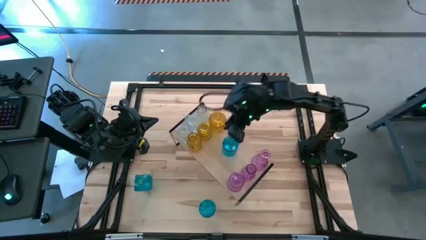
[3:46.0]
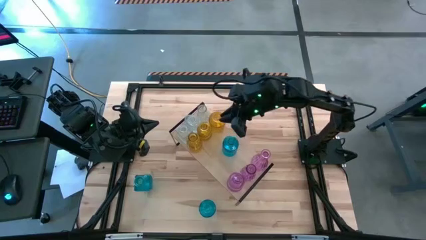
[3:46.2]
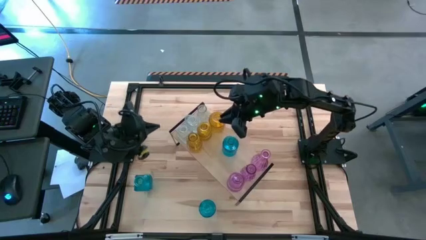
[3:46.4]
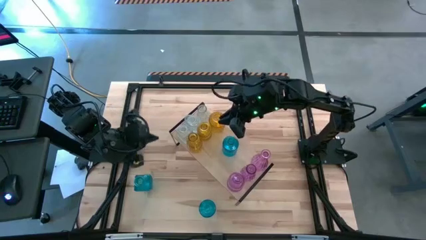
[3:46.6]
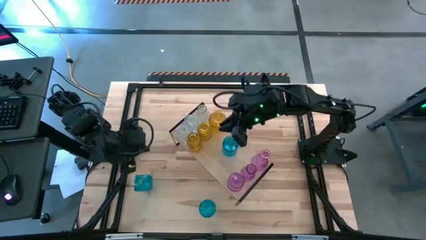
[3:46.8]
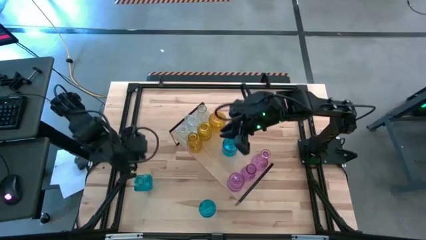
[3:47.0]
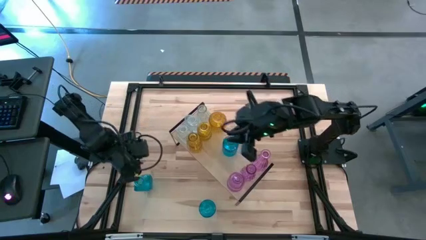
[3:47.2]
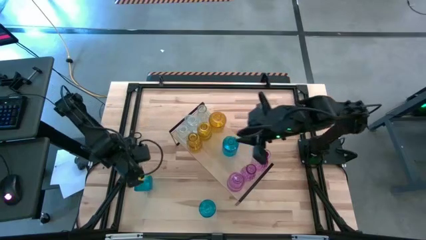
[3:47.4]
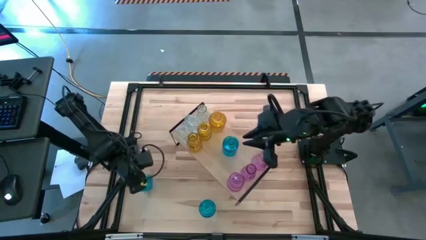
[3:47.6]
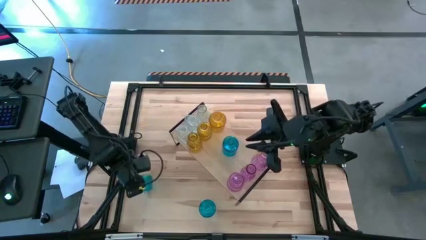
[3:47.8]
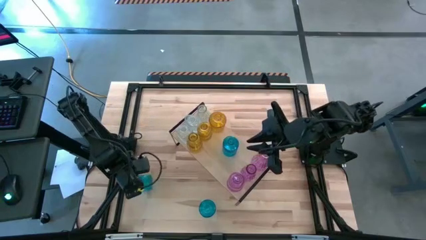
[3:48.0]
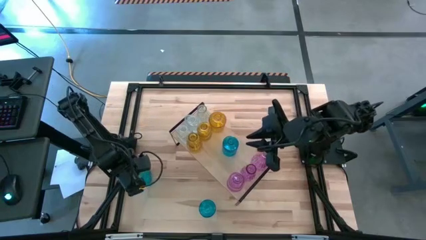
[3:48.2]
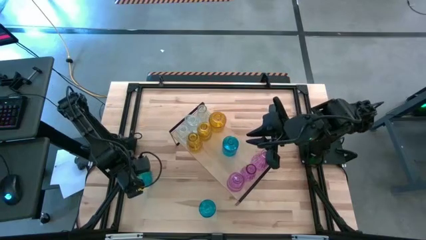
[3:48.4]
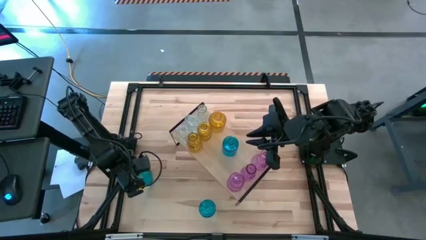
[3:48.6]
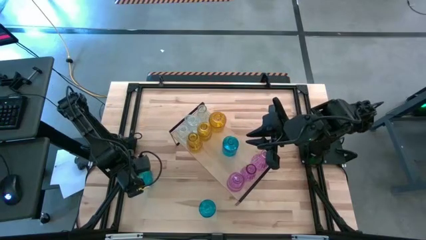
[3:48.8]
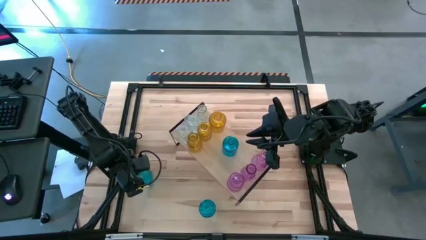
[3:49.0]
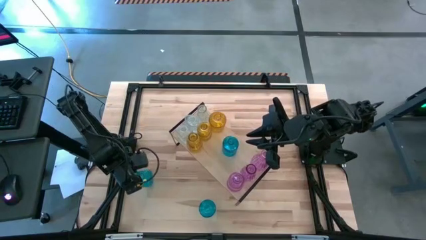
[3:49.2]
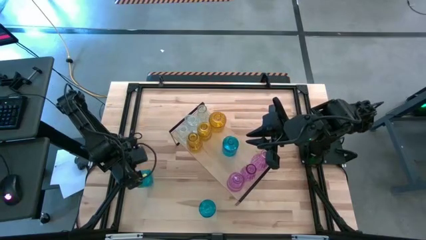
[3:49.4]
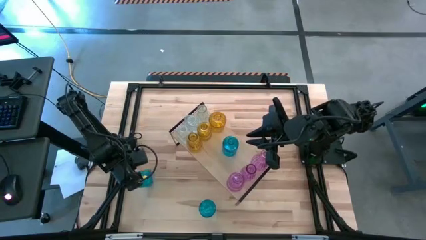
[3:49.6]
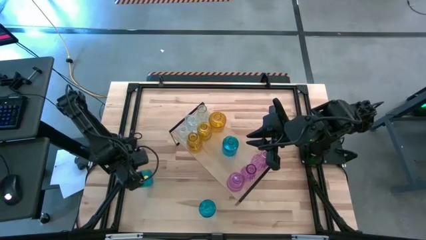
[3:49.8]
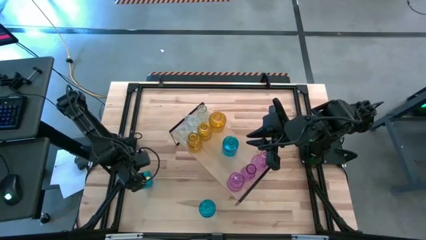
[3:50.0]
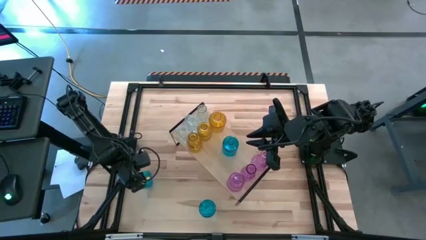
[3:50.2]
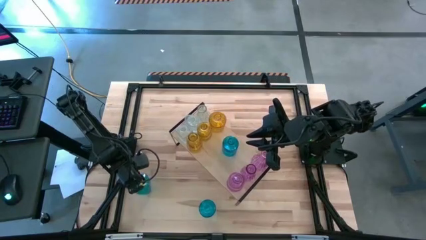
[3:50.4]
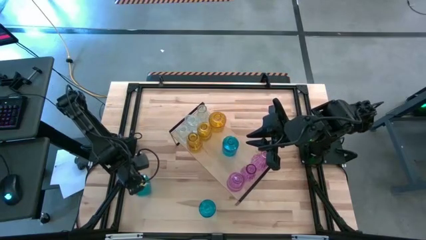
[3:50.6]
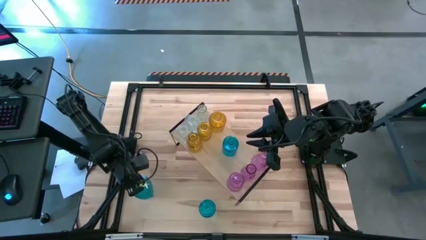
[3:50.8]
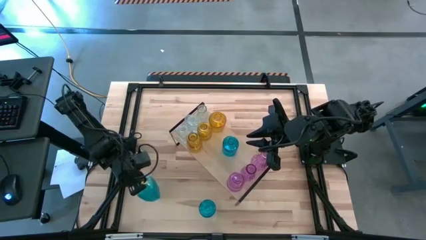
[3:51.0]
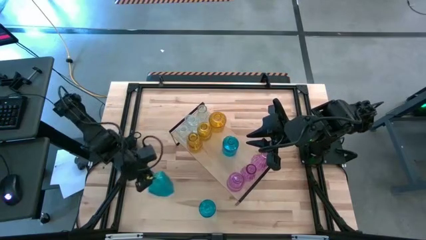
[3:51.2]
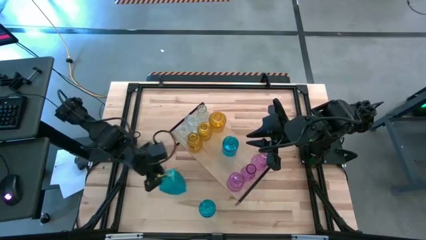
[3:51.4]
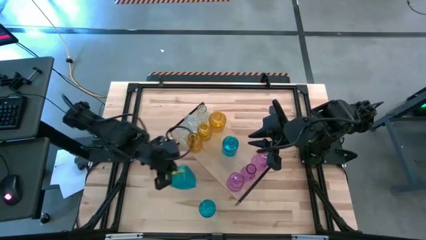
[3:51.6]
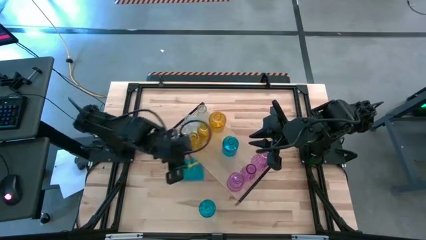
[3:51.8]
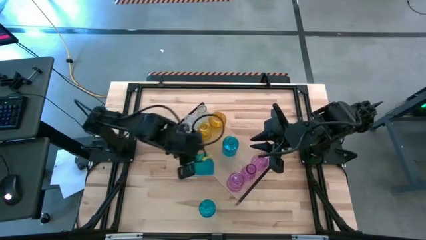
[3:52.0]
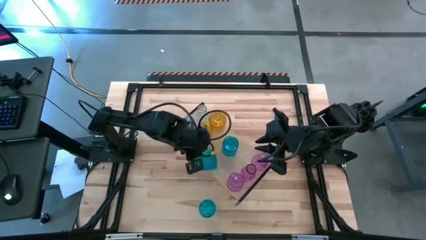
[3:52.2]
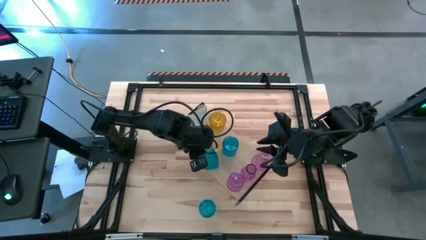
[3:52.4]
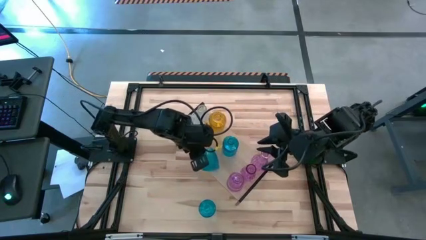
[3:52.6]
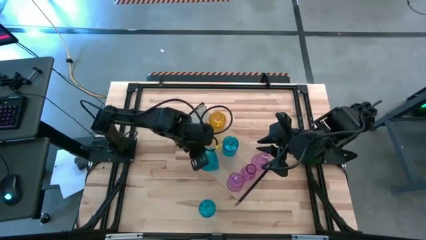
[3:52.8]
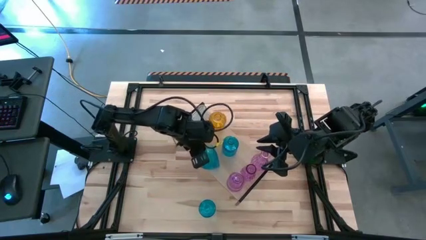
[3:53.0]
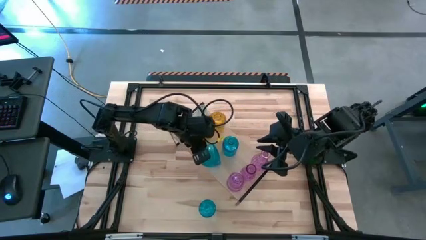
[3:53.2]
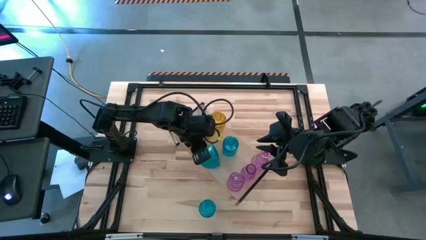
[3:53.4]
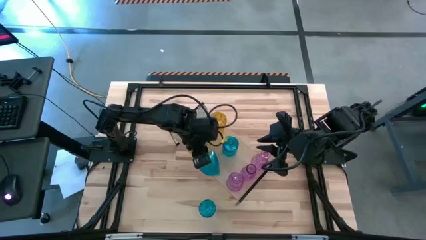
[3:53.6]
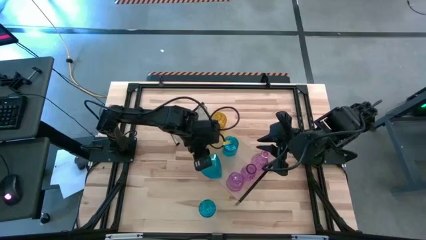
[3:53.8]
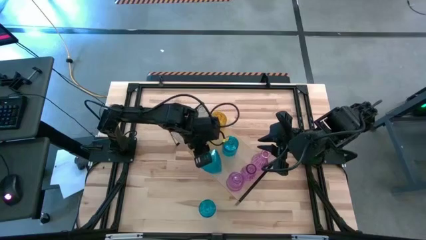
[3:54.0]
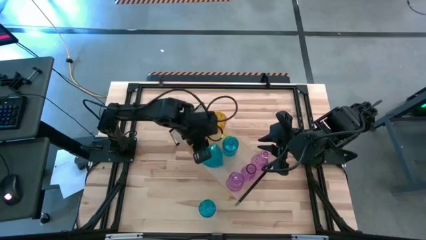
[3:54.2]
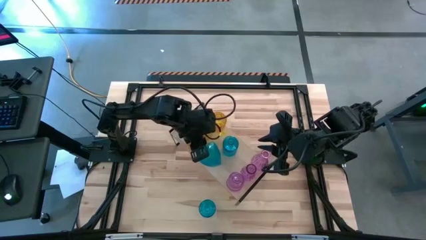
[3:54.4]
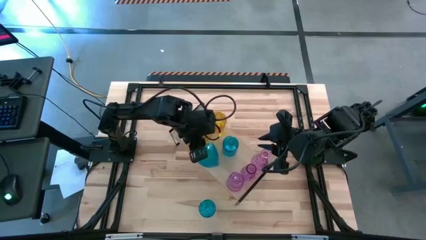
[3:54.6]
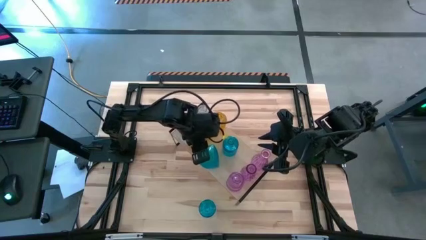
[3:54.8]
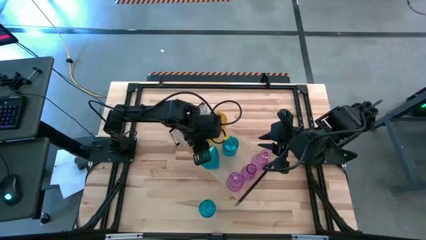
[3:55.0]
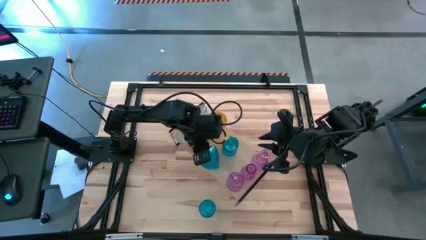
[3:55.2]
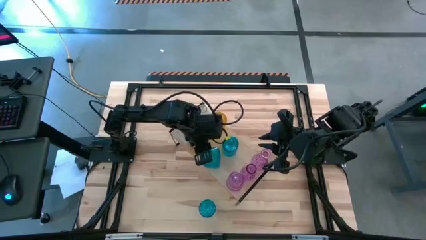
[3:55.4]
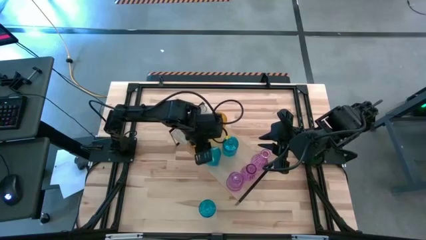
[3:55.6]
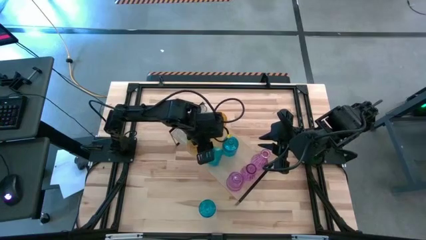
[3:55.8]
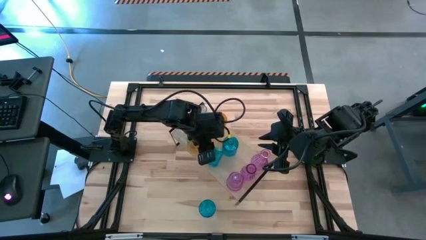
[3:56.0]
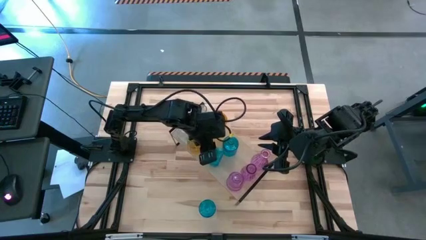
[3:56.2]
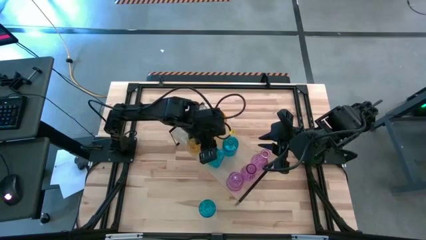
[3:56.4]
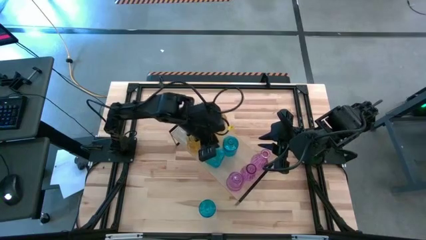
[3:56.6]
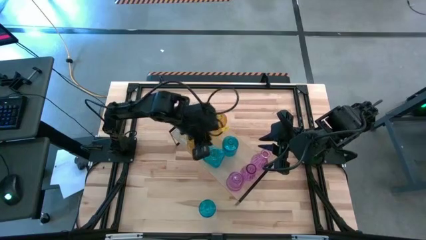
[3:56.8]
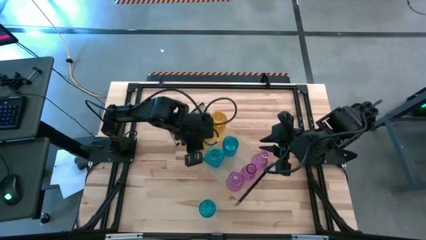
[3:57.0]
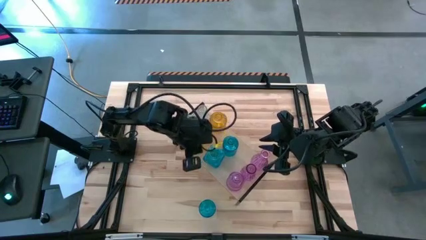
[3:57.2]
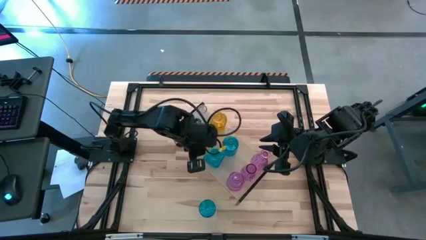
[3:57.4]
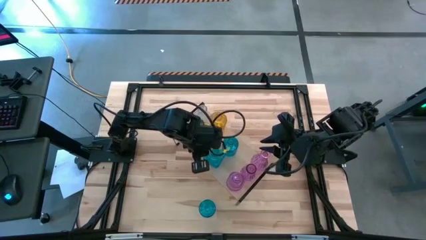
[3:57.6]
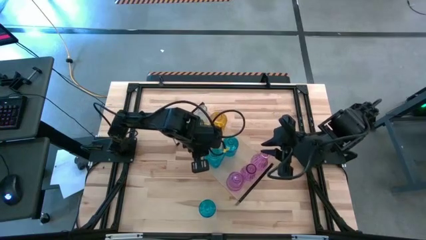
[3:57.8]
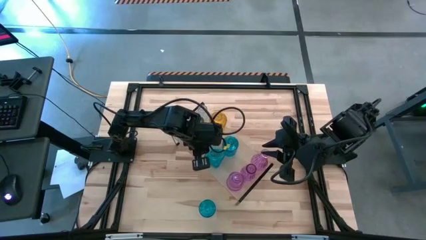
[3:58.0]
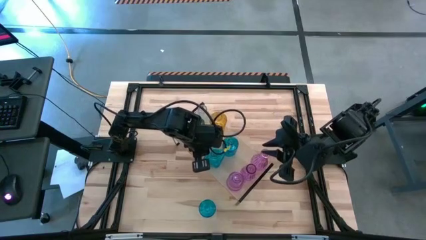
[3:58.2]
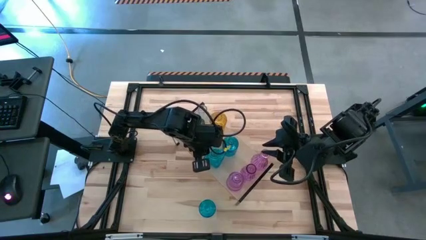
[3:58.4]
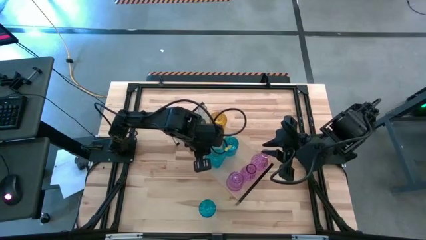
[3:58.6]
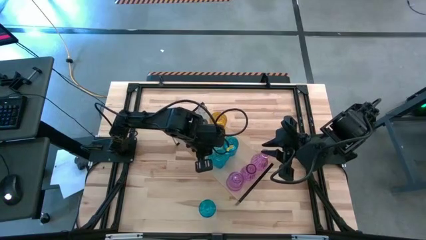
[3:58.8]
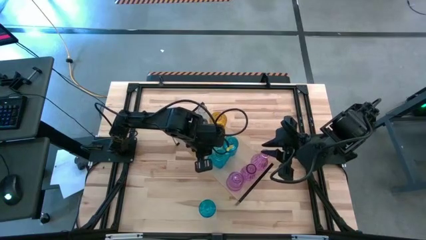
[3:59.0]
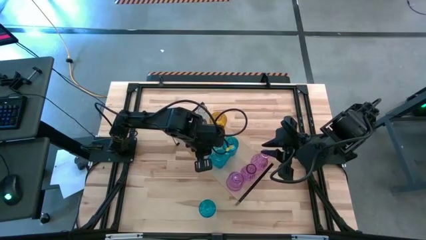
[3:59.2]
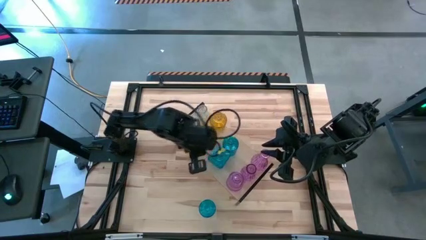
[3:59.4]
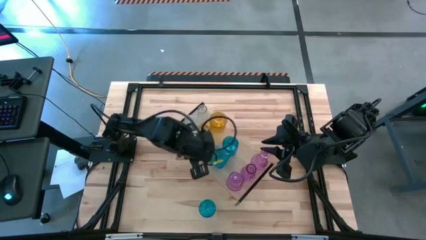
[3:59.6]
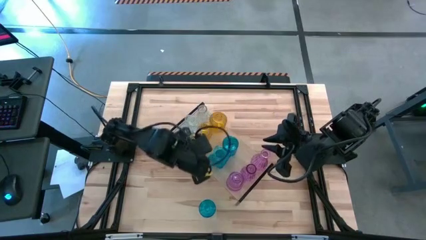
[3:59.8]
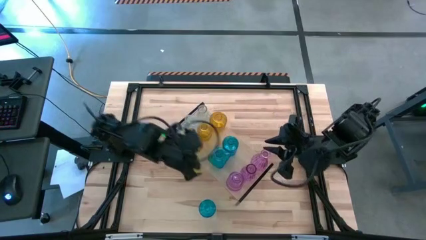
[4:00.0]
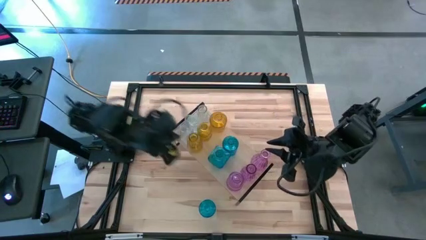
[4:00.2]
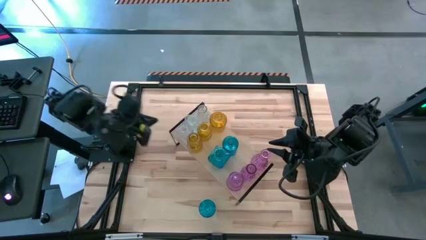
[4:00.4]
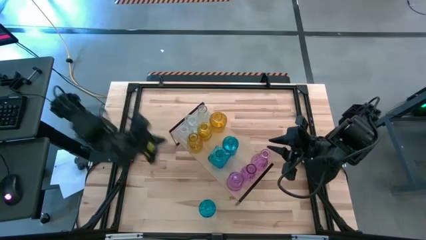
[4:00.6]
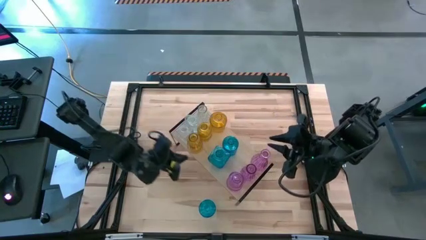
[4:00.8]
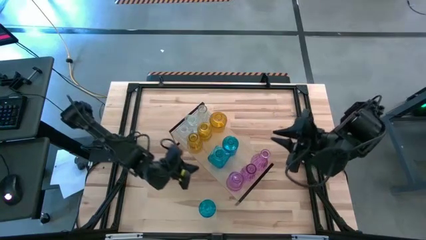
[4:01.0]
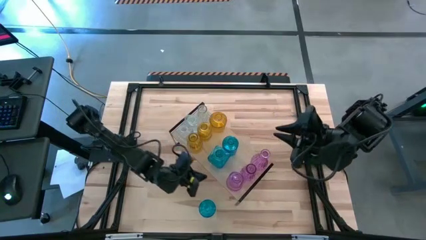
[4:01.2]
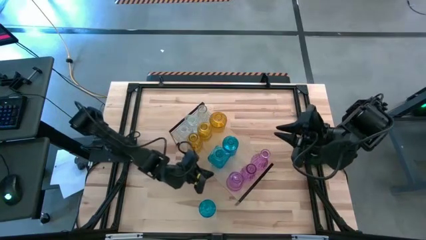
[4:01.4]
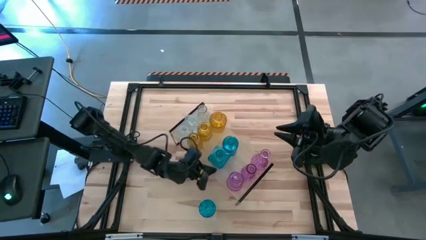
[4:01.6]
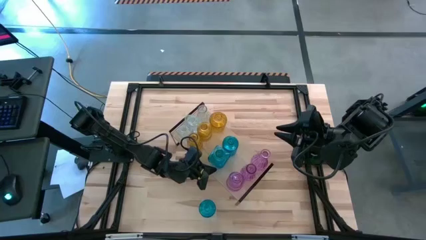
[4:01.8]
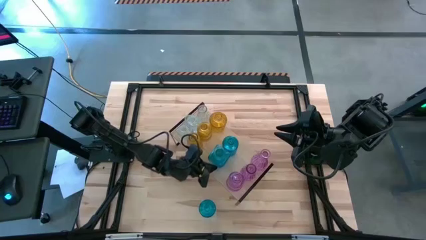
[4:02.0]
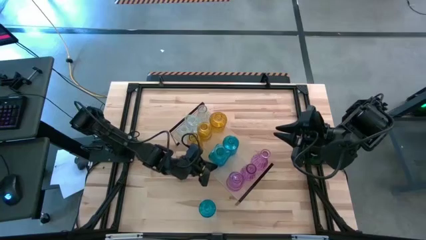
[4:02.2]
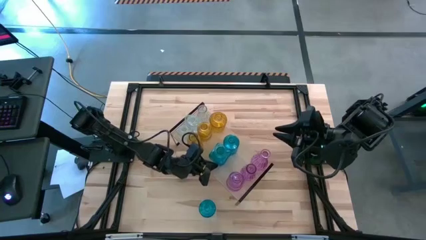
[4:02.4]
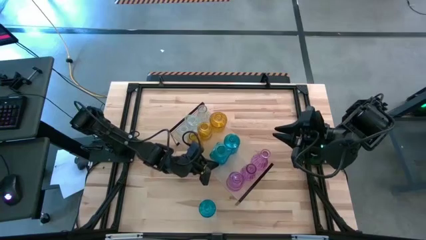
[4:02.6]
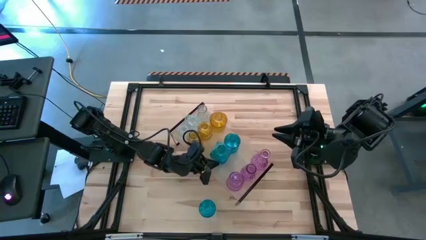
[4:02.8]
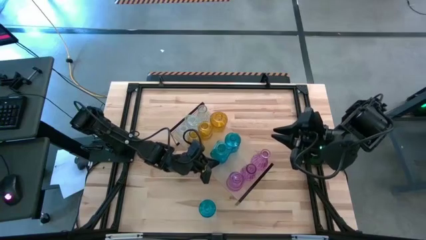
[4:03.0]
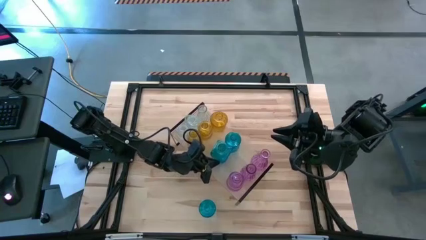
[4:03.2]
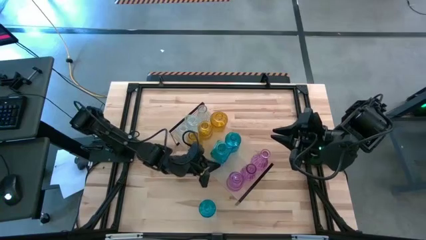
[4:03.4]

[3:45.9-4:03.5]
Task: sort vases onto shelf
Put the left blue flower vase on the shelf aligned with the other blue flower vase
